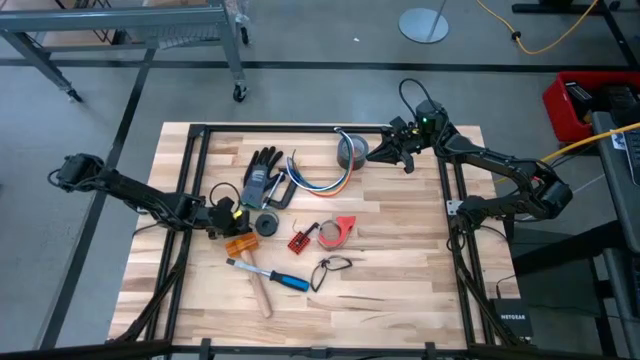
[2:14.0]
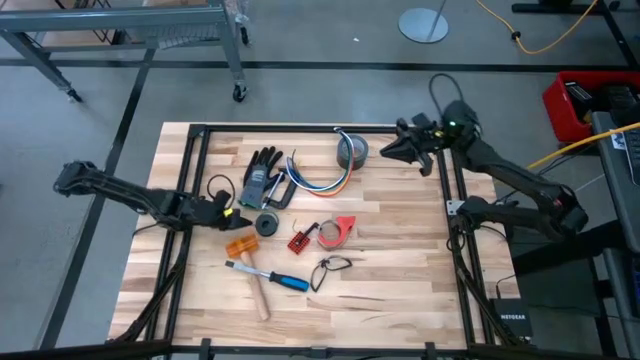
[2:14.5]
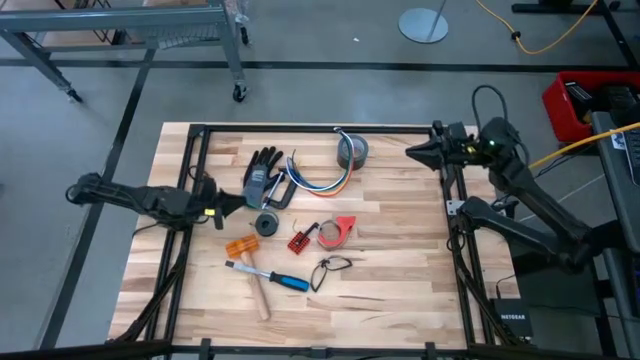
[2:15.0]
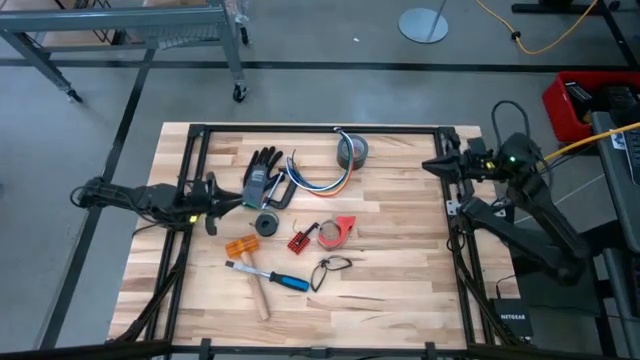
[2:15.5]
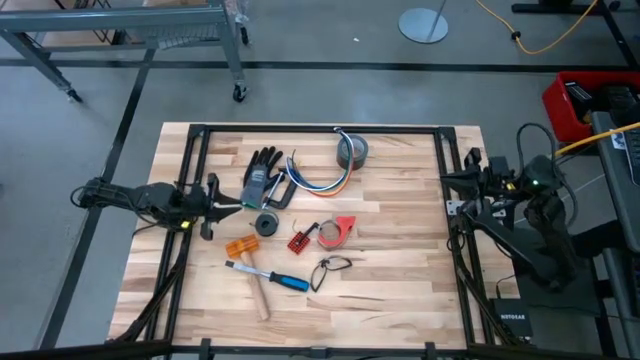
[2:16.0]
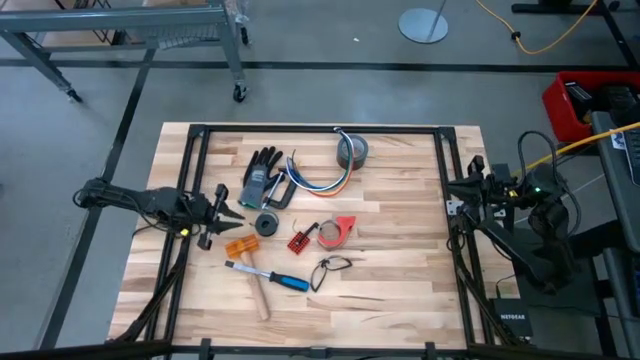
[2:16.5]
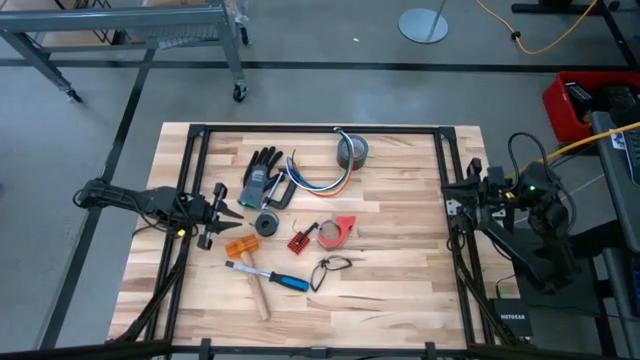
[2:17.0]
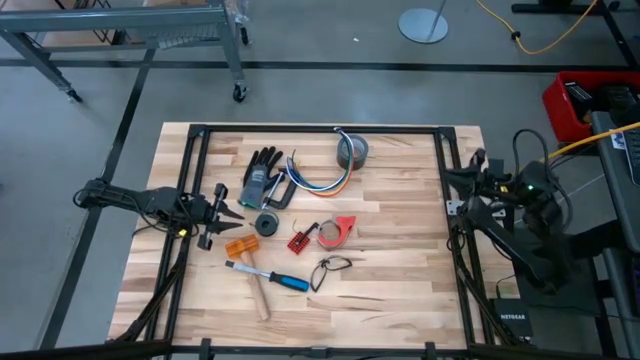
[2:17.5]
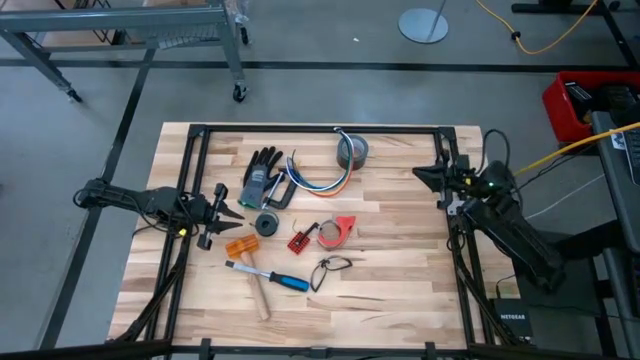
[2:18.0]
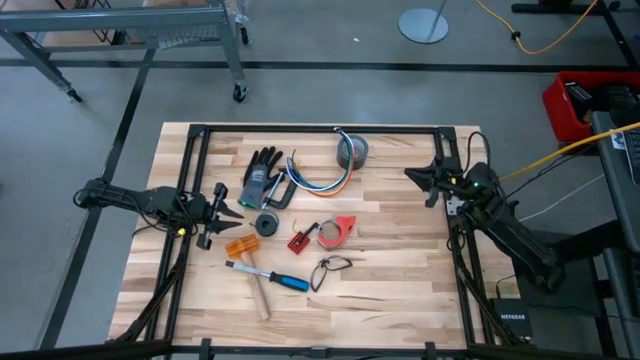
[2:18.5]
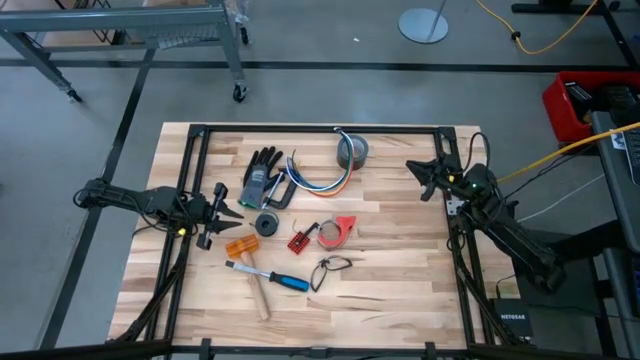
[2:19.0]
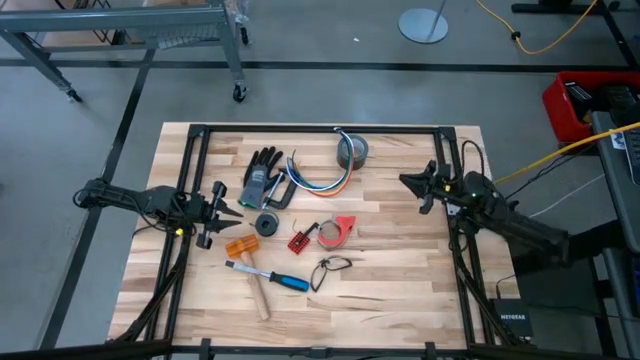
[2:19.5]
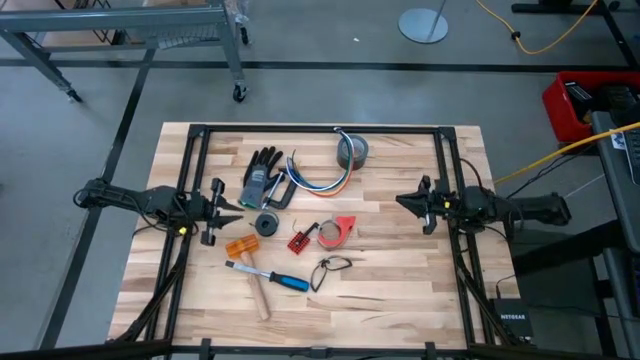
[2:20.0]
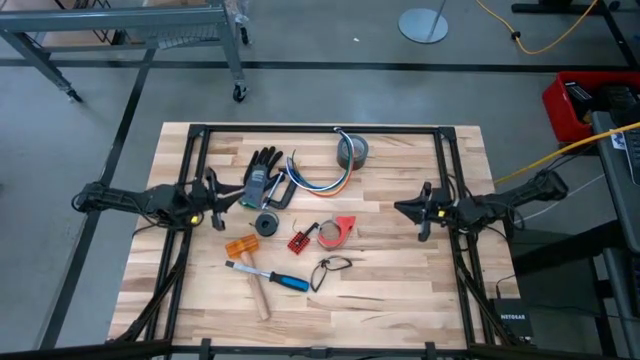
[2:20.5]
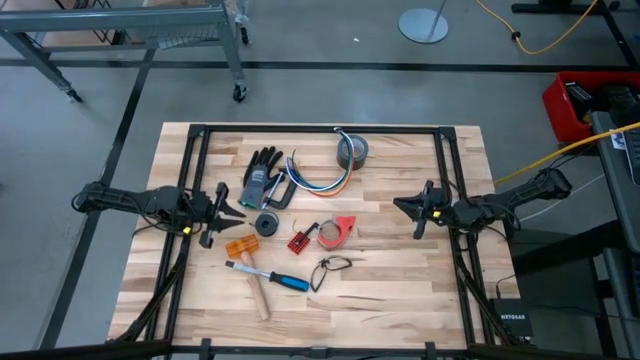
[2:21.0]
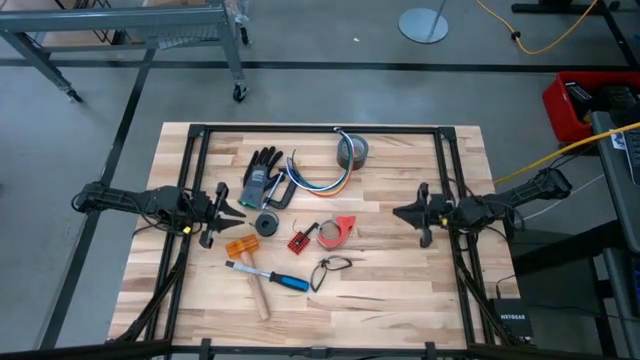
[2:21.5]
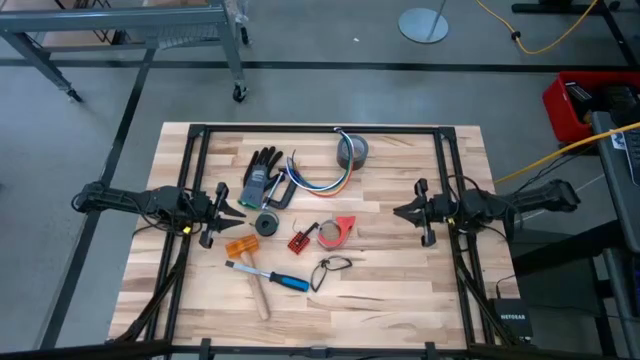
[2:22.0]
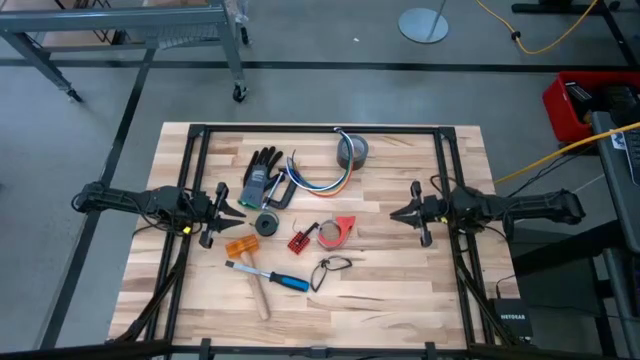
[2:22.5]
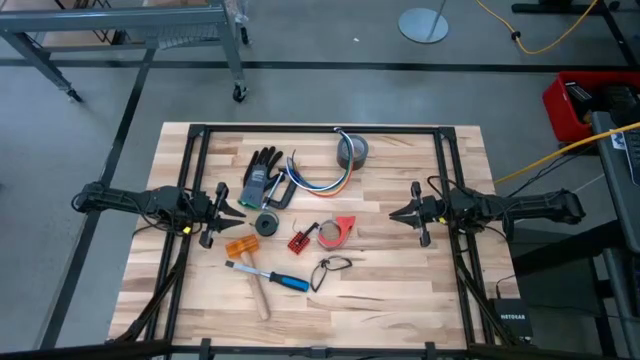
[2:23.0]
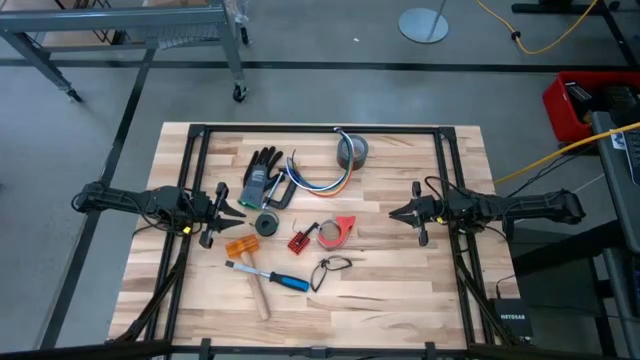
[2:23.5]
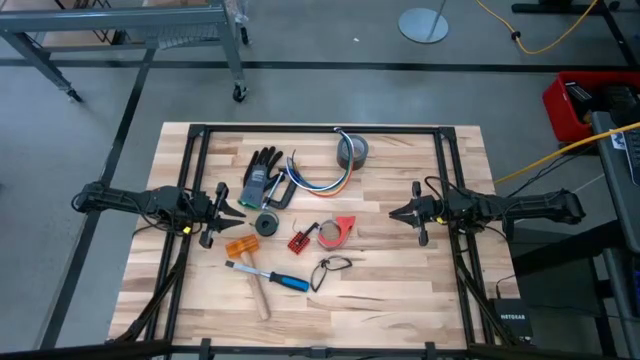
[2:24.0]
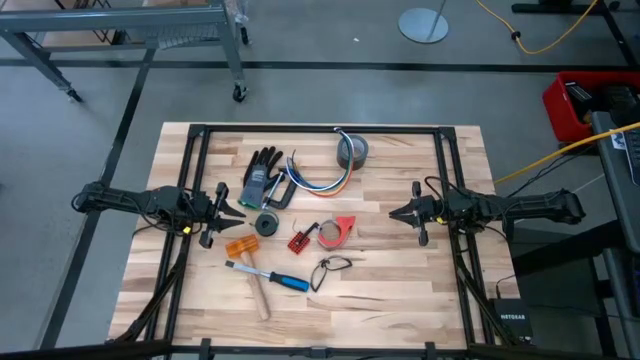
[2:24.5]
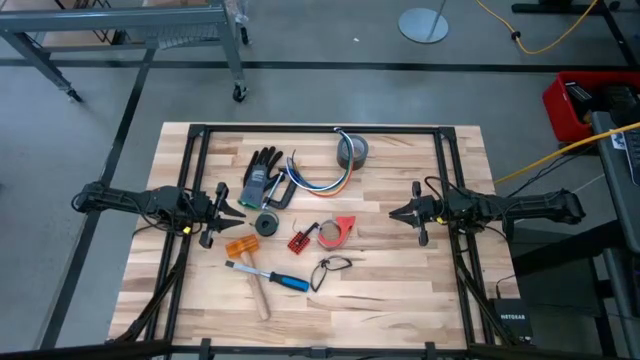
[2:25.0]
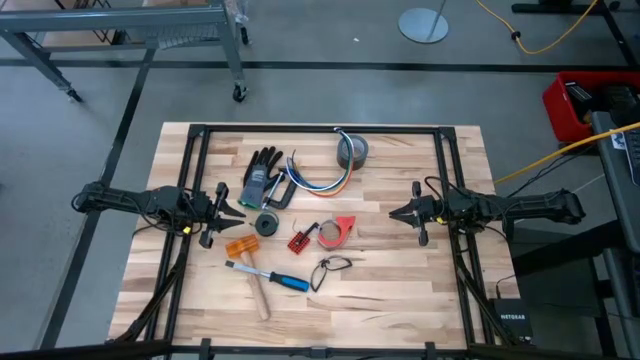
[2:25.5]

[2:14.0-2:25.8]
Task: Coil cords
Return to Home Position
